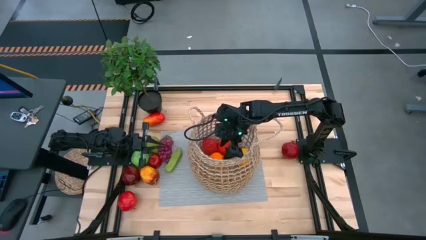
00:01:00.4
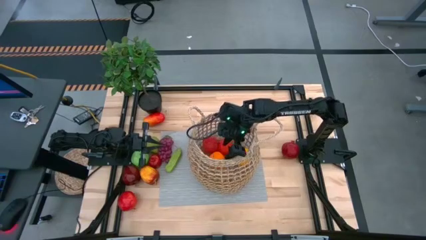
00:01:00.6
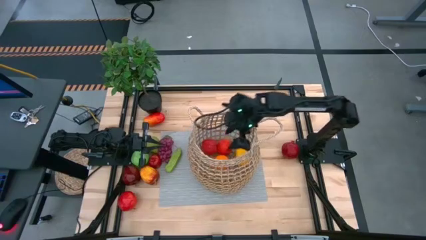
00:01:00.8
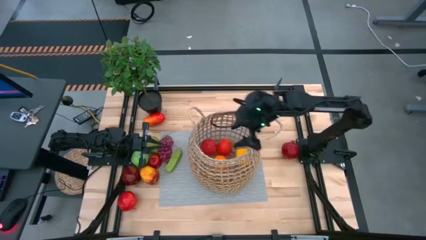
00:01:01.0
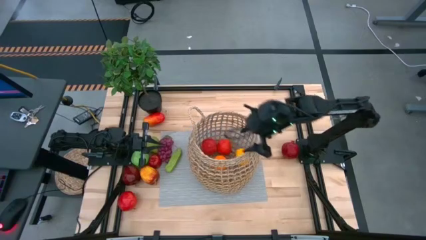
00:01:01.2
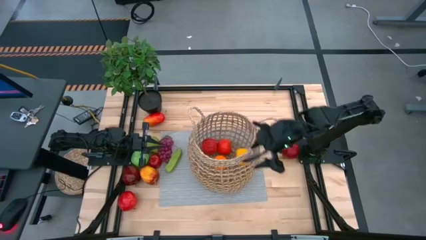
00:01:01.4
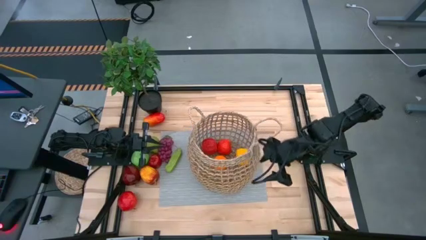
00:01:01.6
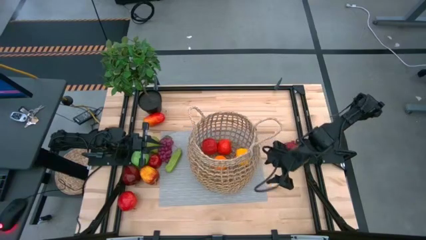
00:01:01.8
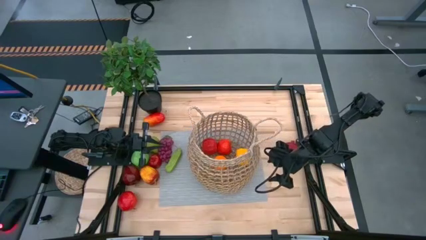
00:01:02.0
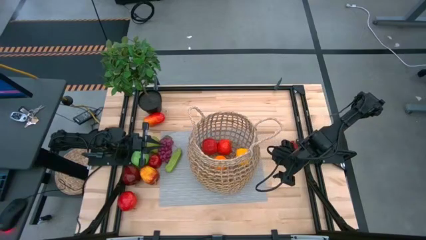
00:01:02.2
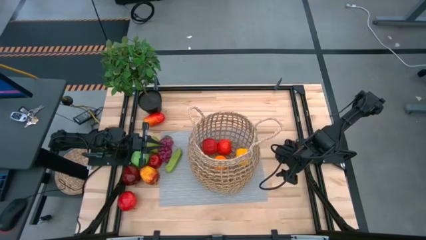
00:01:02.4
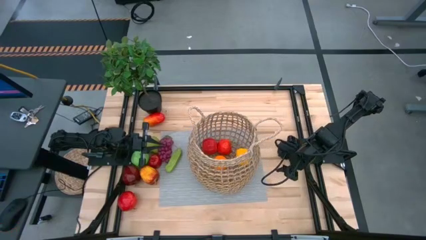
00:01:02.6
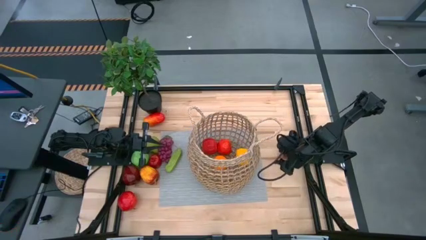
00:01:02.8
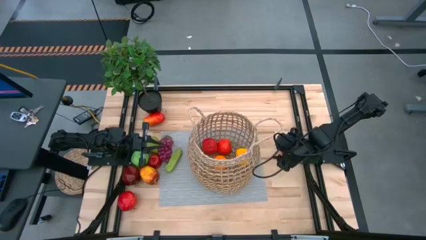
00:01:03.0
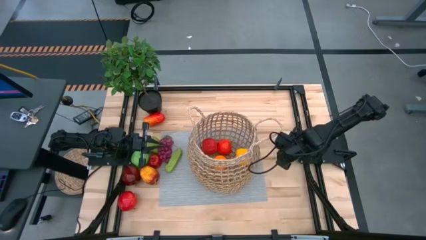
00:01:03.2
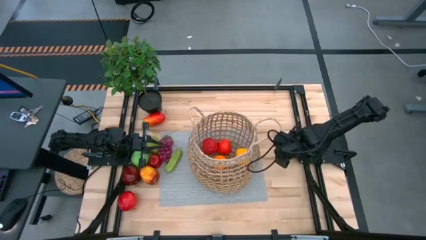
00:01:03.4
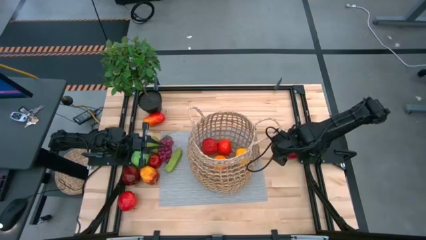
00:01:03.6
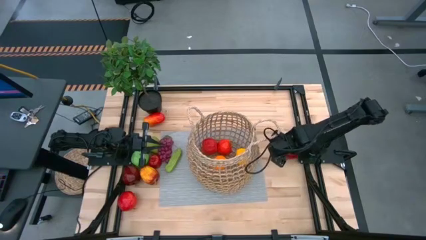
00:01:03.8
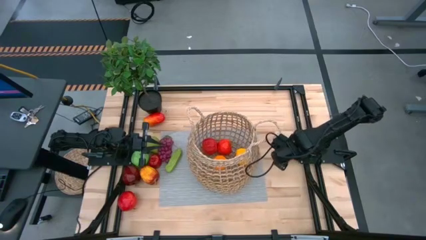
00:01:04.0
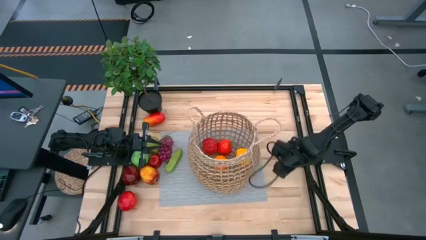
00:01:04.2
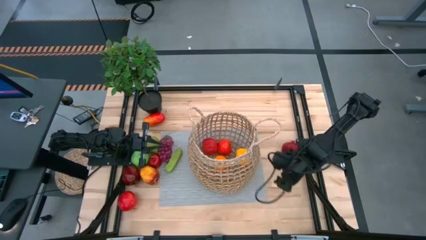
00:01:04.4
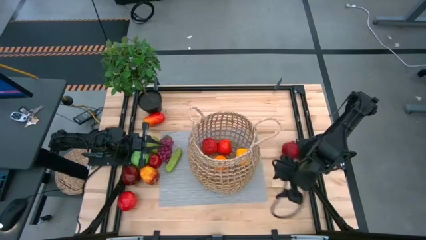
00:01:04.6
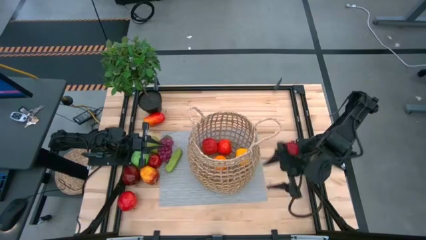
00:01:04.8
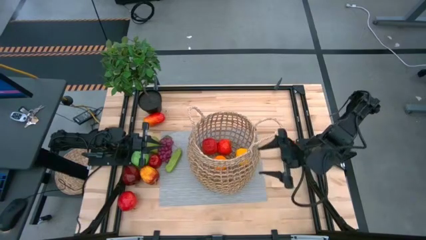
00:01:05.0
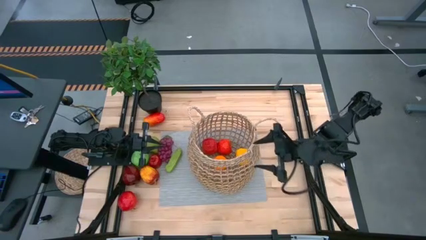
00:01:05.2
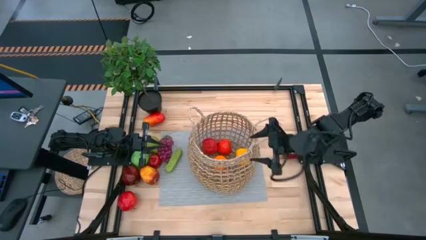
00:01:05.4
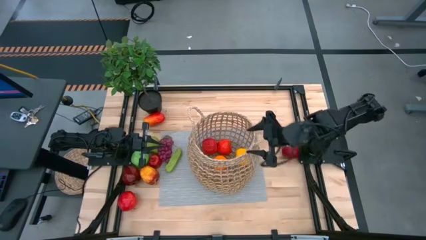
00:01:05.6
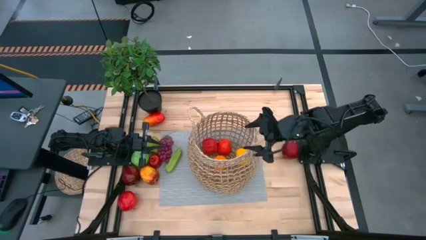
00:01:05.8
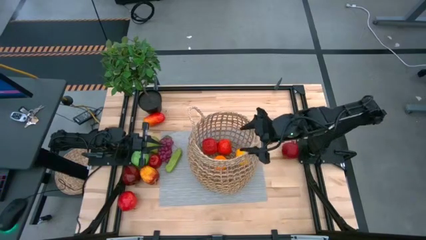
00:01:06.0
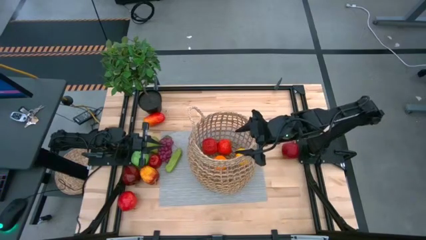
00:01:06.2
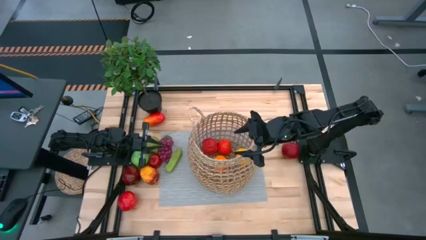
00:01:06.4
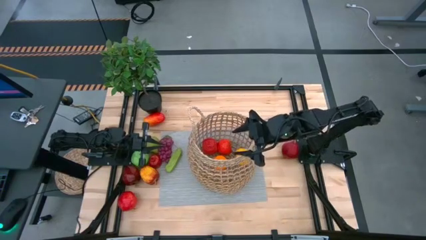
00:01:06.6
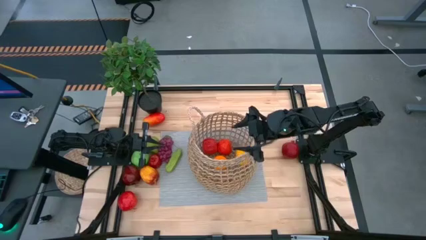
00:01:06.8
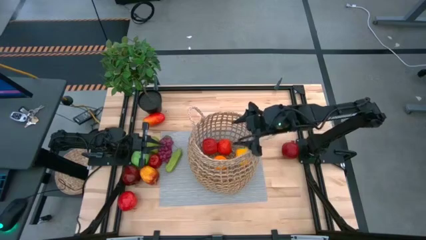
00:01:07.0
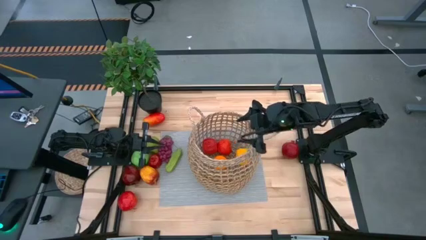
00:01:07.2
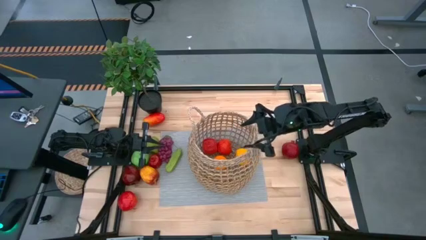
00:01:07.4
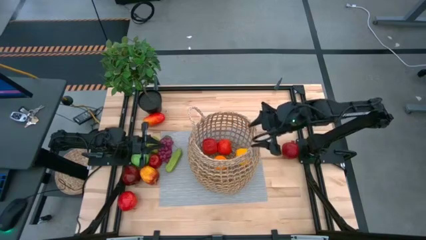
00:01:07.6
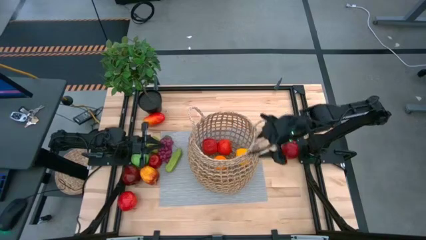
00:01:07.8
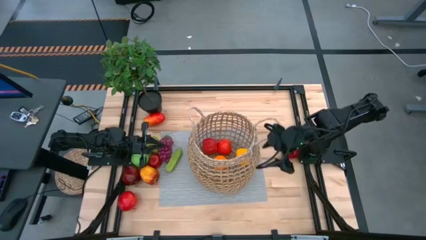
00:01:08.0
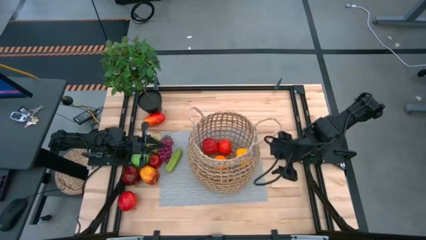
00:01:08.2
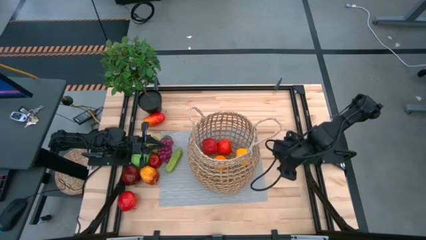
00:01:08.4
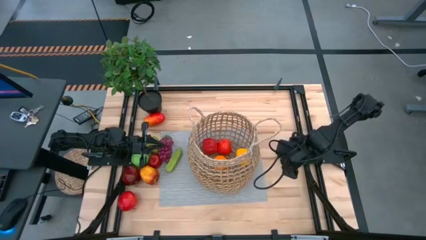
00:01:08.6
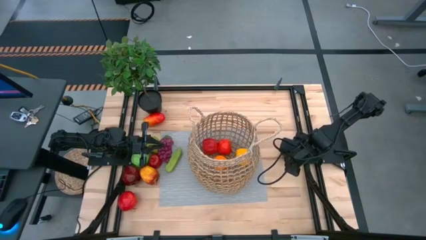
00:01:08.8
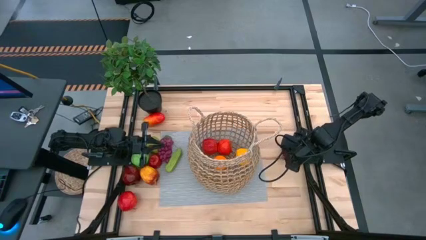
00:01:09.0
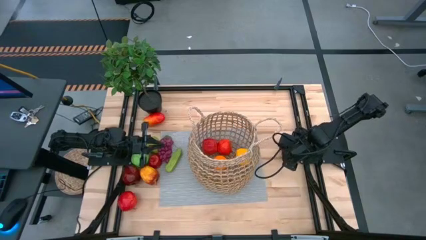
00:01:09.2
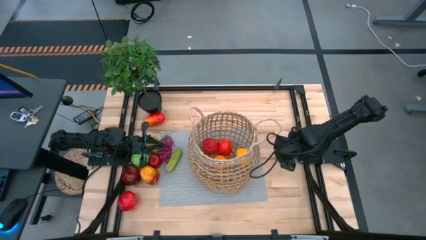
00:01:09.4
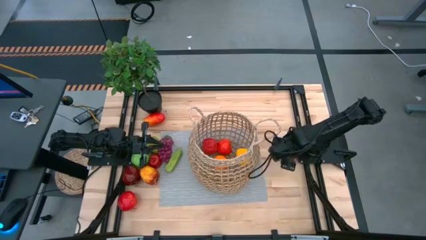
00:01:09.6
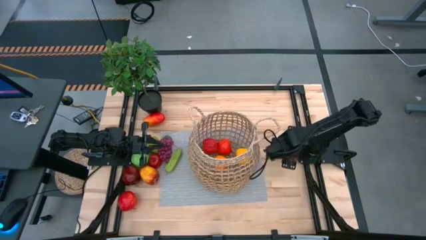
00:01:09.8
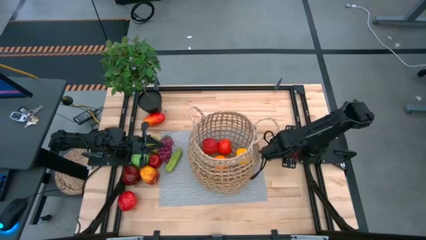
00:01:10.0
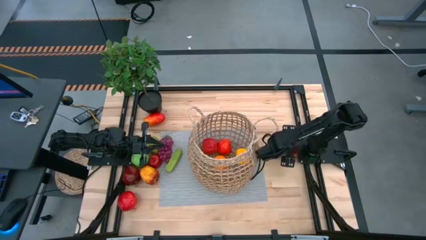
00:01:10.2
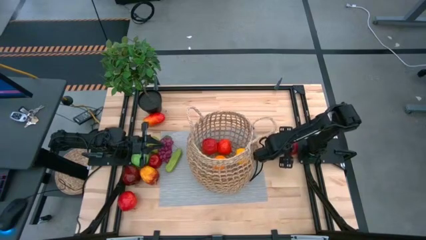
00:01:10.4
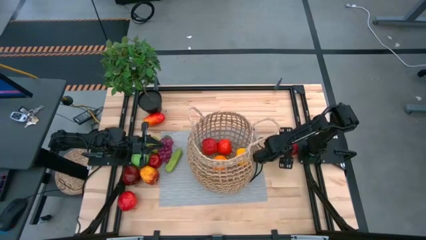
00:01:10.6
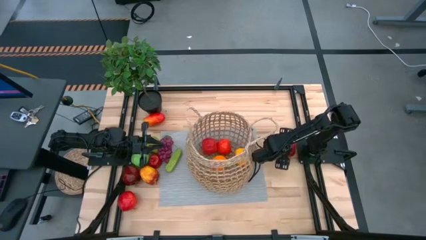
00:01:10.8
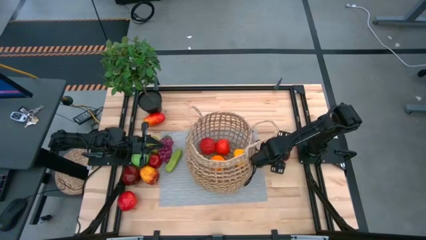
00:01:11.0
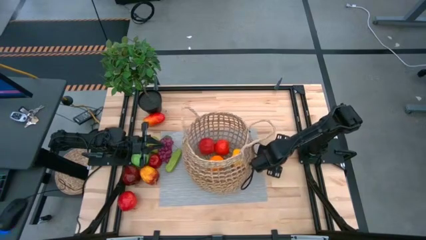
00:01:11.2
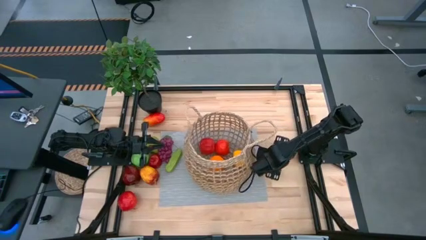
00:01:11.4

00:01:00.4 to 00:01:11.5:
Task: Build produce basket
Put the red pomegranate into the brown basket

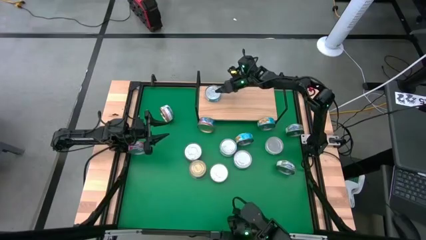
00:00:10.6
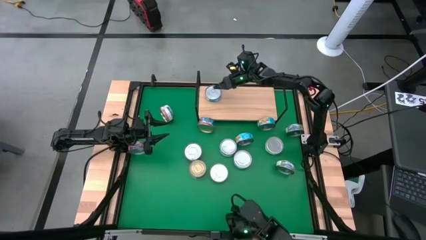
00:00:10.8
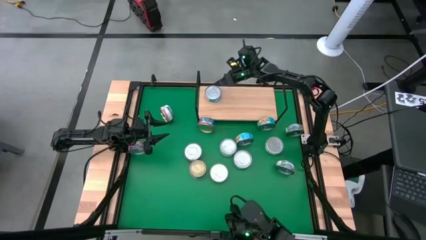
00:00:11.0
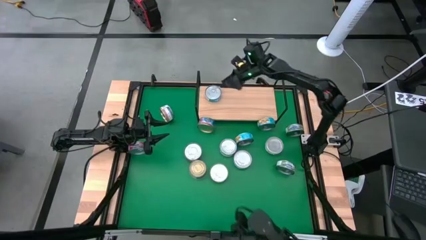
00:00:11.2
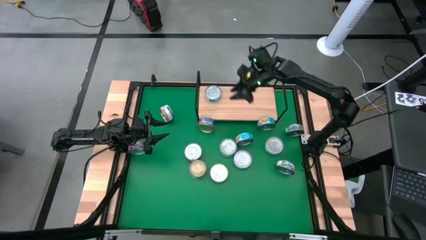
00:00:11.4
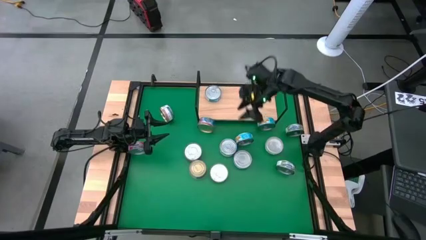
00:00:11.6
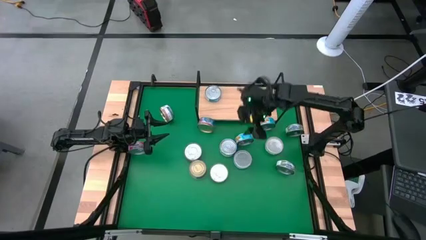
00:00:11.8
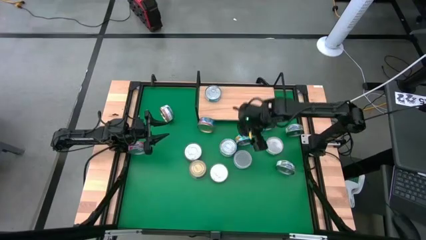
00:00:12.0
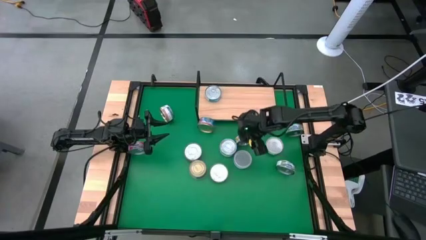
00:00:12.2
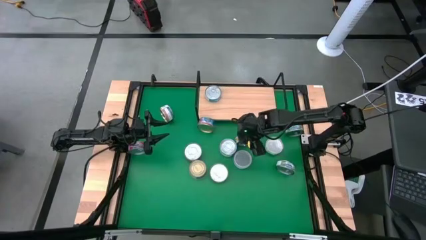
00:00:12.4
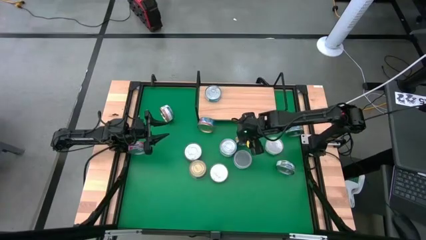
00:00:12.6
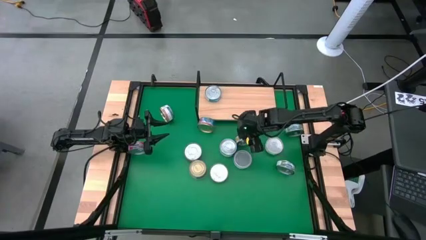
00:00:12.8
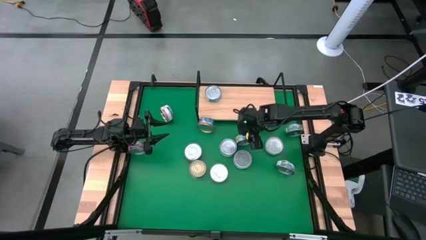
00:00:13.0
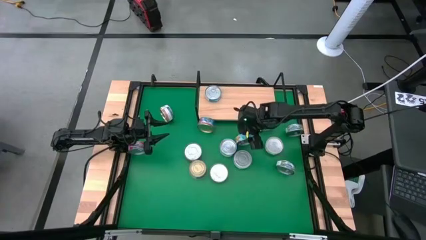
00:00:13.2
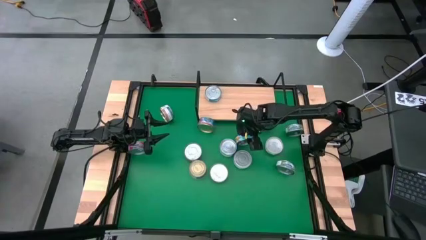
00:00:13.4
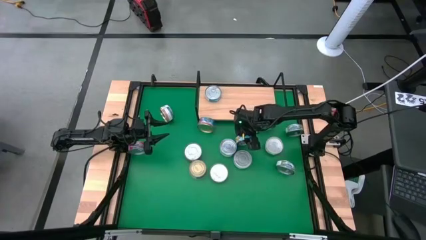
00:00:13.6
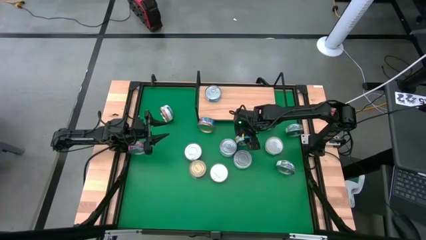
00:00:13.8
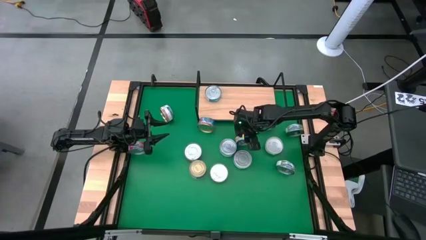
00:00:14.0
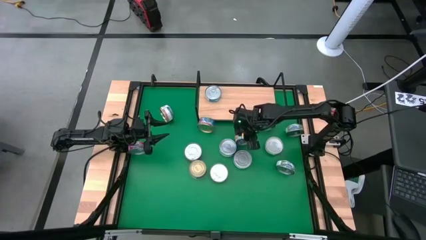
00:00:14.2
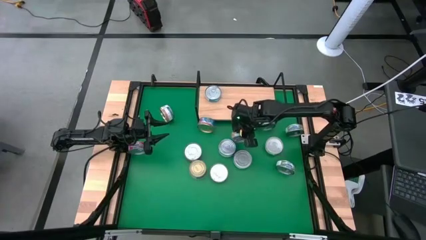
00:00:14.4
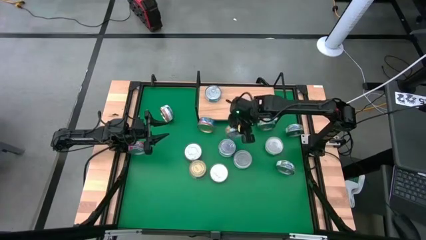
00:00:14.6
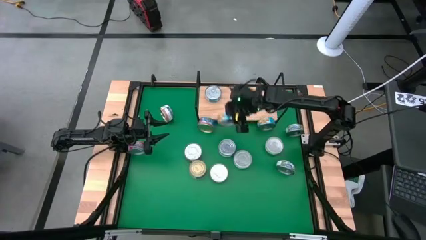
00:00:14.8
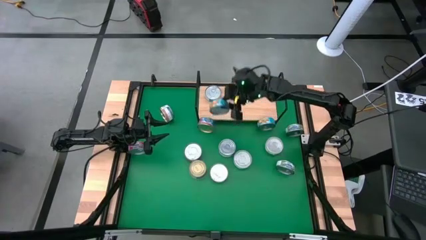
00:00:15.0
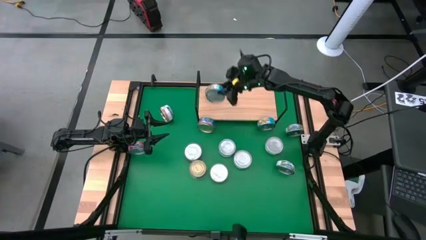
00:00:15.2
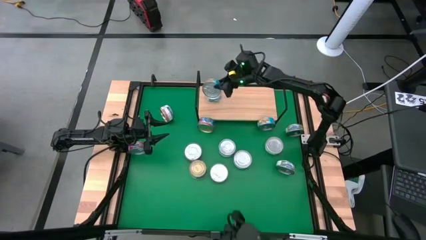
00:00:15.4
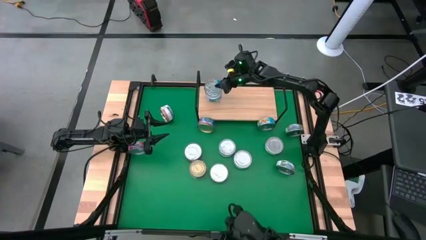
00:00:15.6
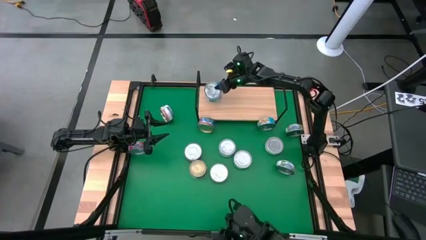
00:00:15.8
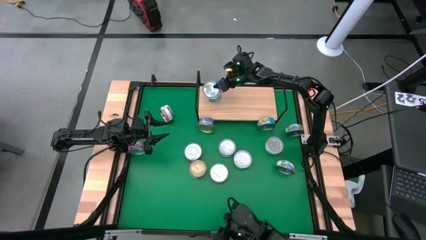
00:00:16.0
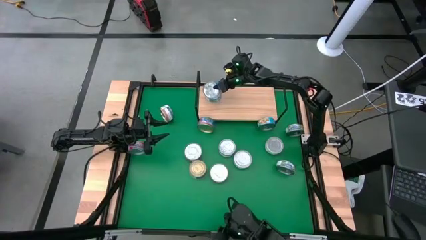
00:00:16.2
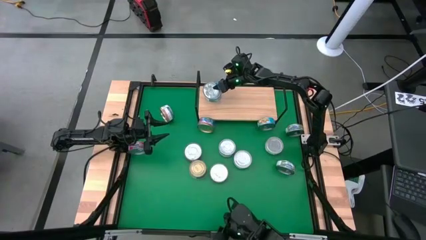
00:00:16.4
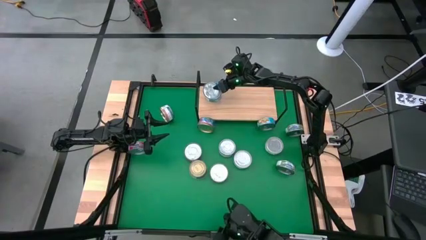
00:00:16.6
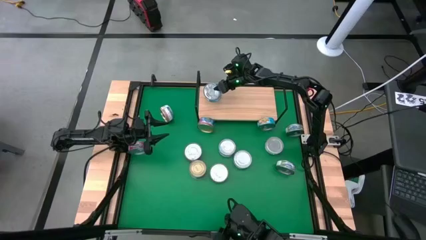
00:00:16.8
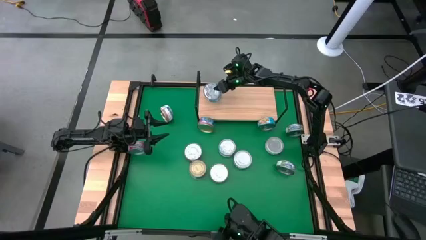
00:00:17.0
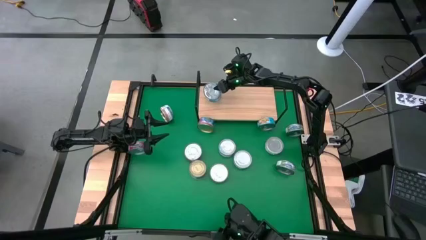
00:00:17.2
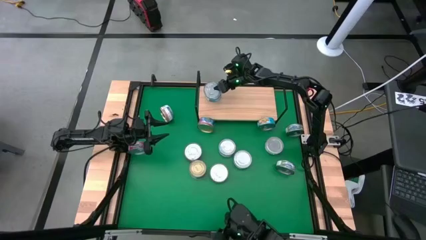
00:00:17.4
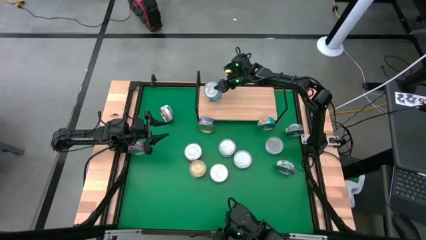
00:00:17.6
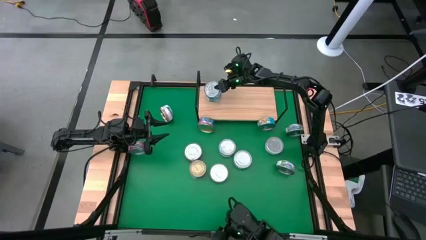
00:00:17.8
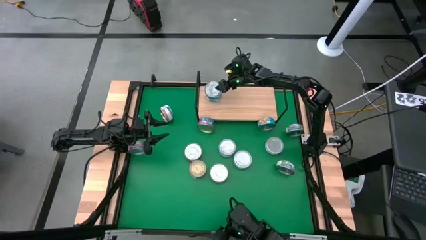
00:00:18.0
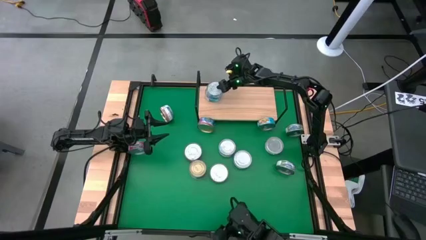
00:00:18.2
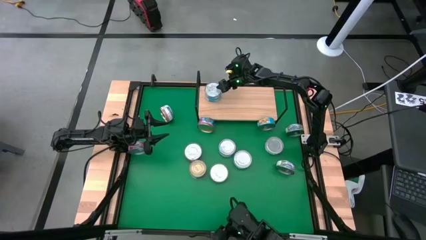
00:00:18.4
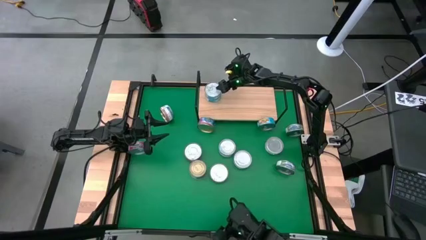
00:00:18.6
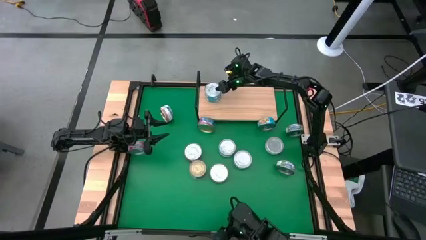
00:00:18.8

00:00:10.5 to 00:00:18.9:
Task: Stack canned seafood by type on shelf
Stack the yellow blue tuna can on top of the yellow blue tuna can on the shelf
